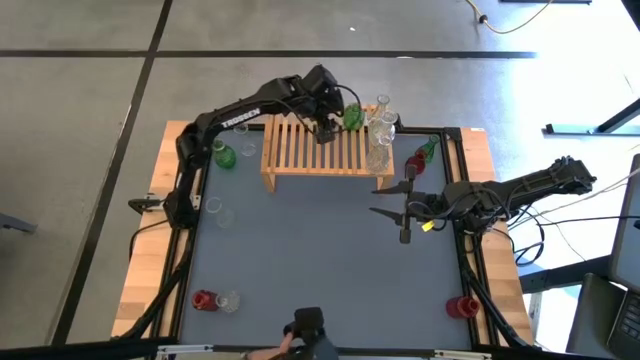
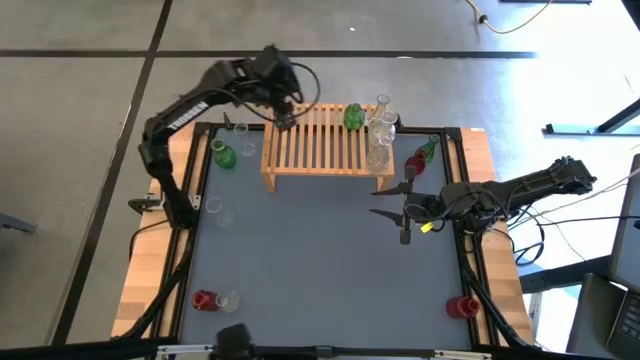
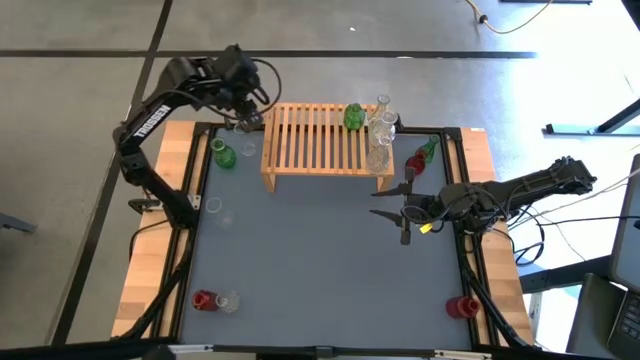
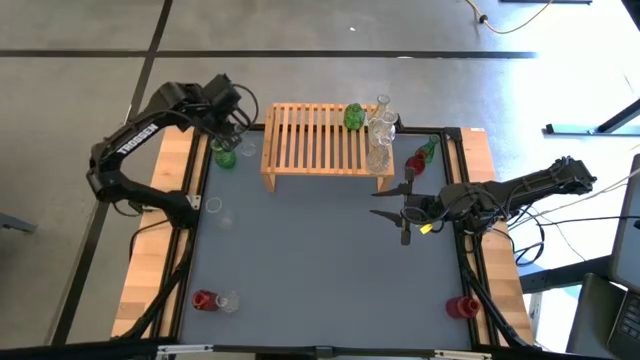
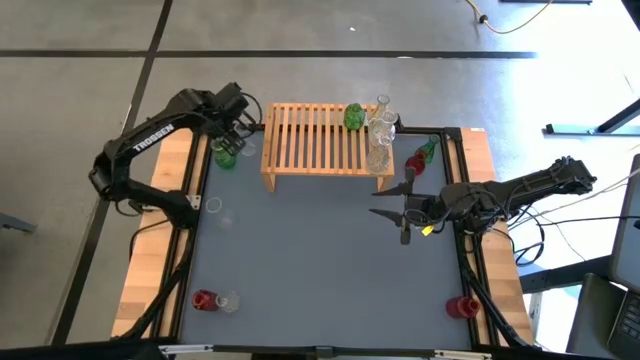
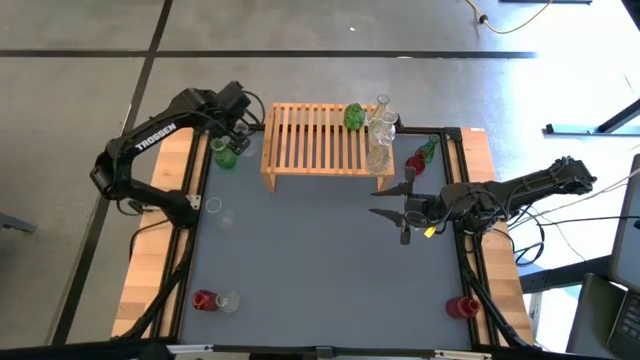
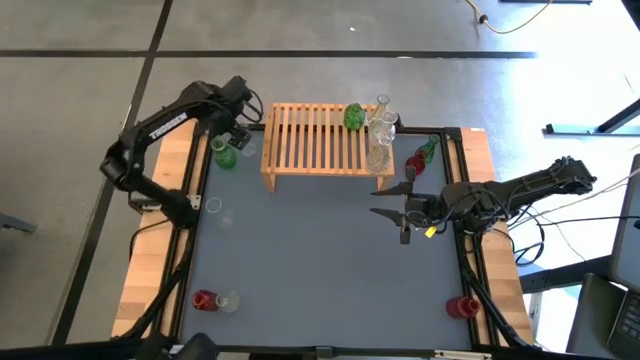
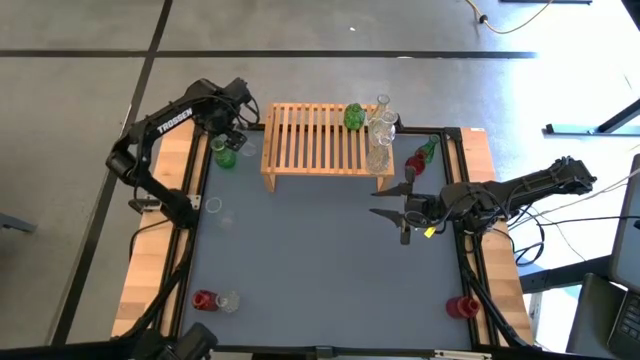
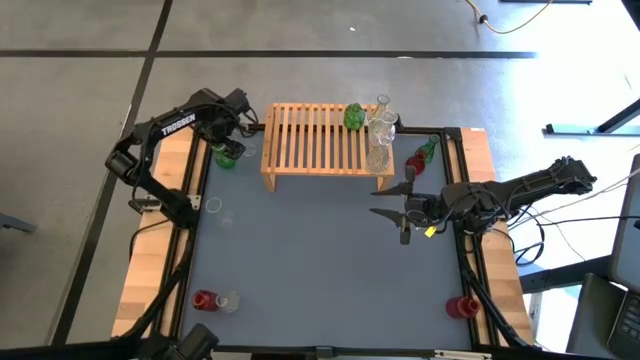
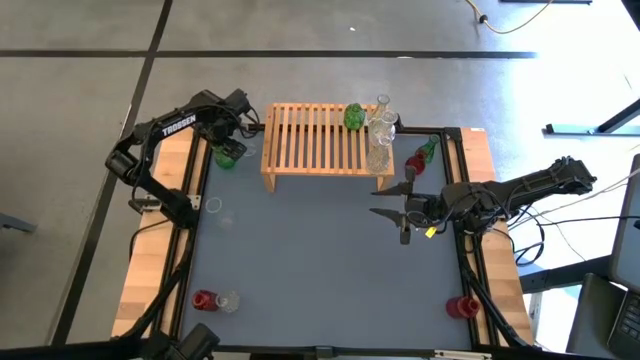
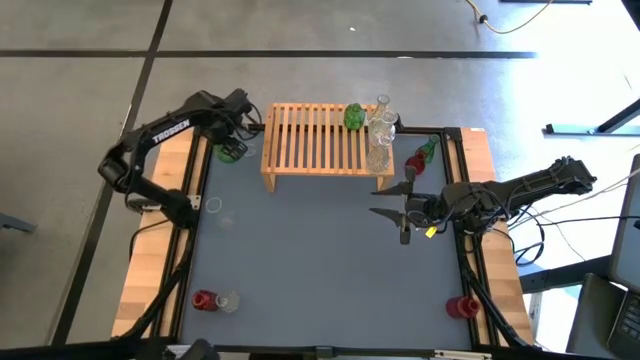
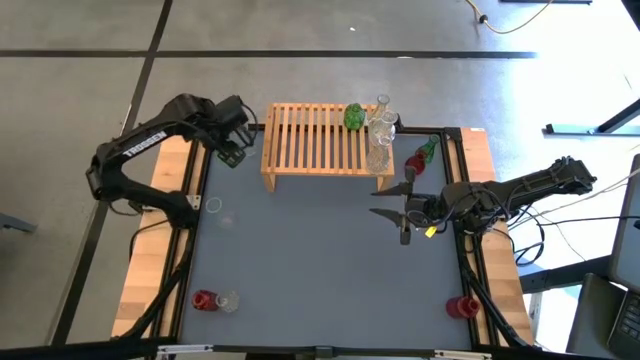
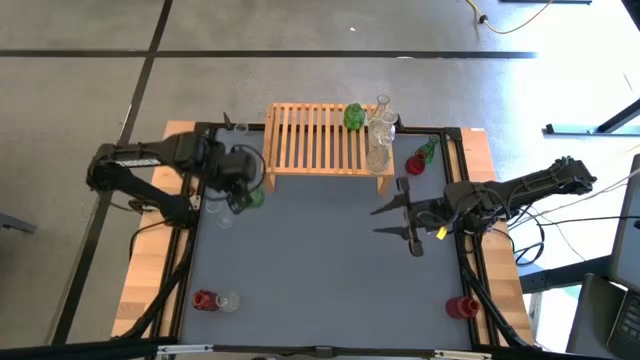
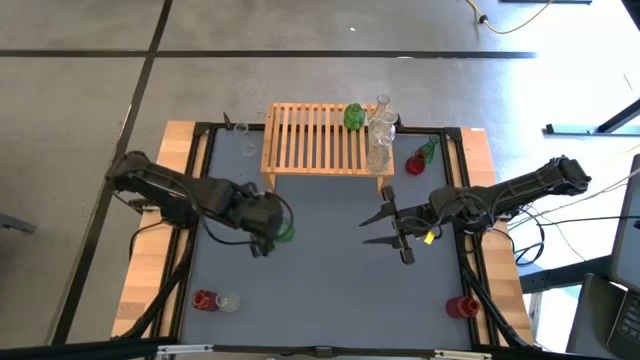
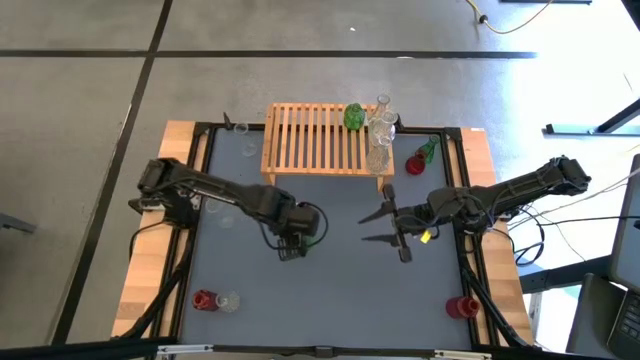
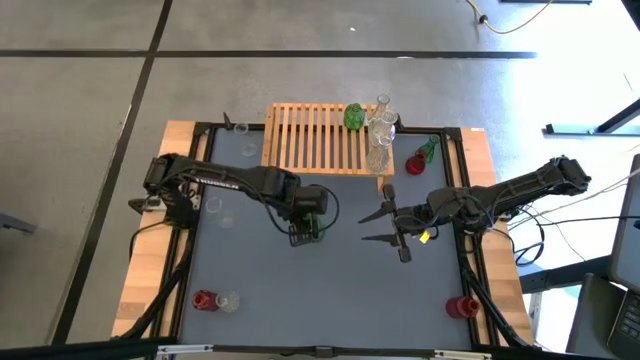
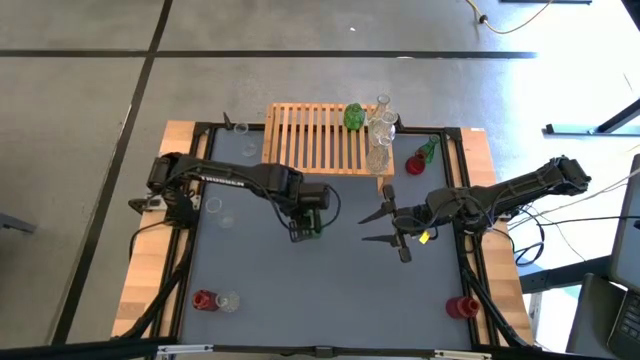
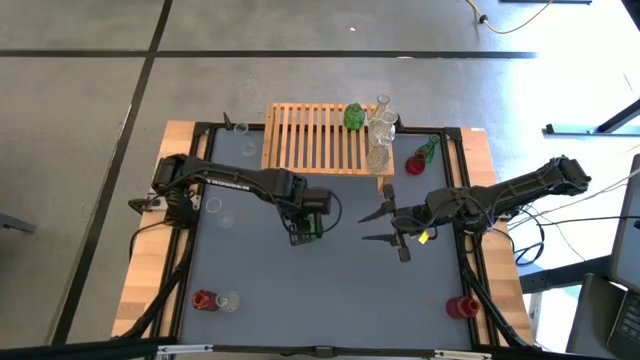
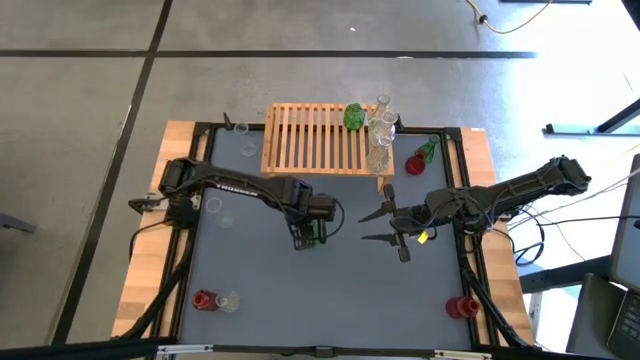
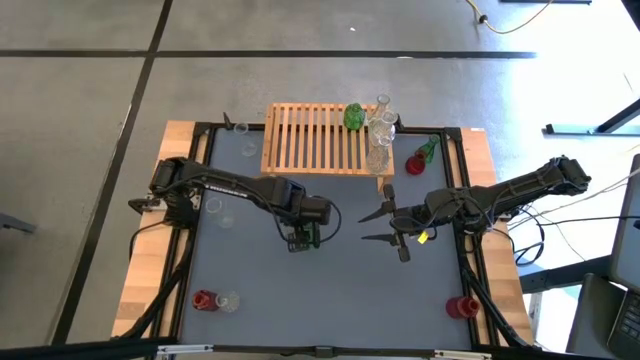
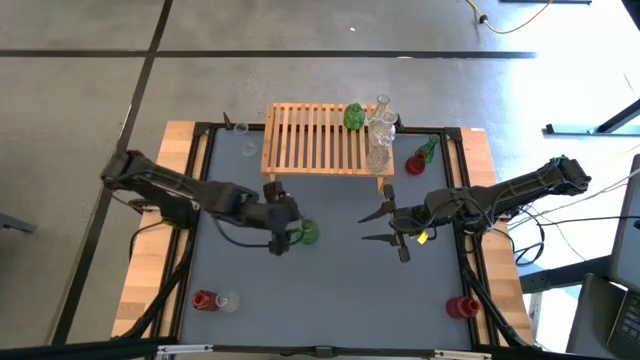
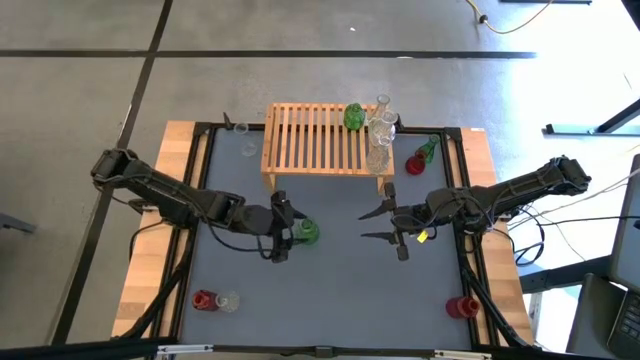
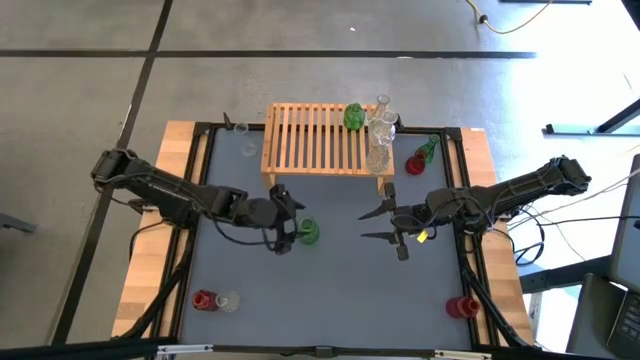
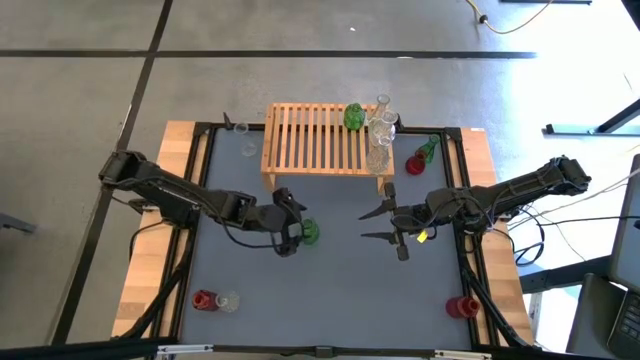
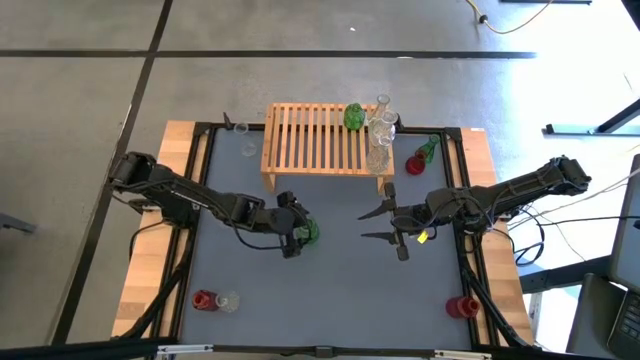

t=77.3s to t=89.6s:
Task: sort vases onto shelf
Put the green vase on the shelf aligned with the other green vase

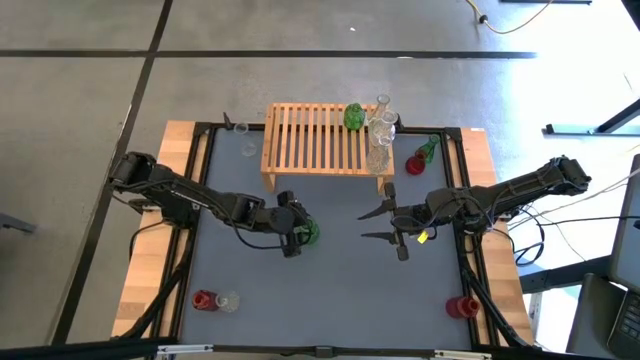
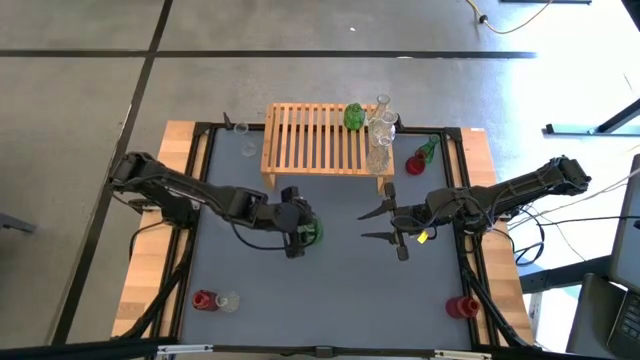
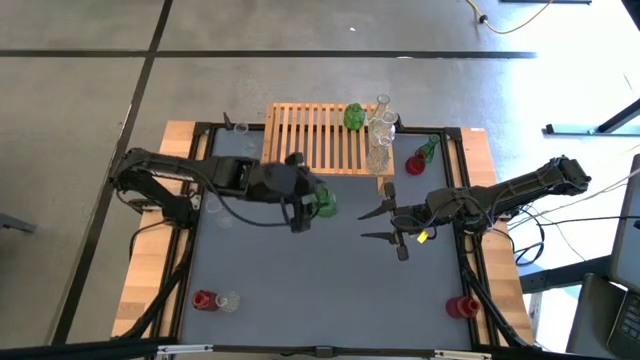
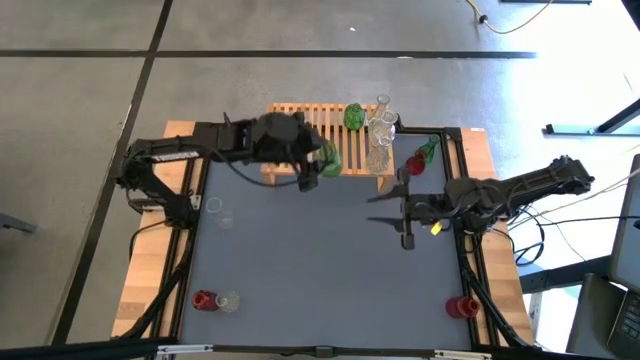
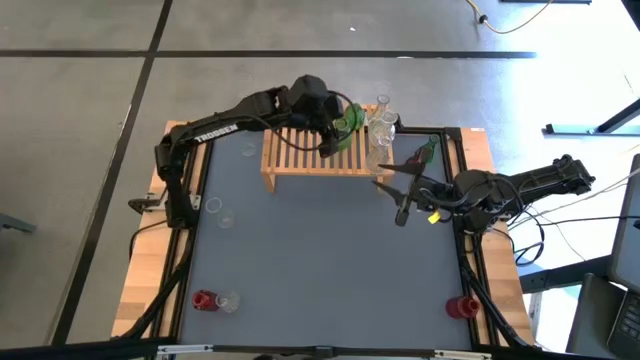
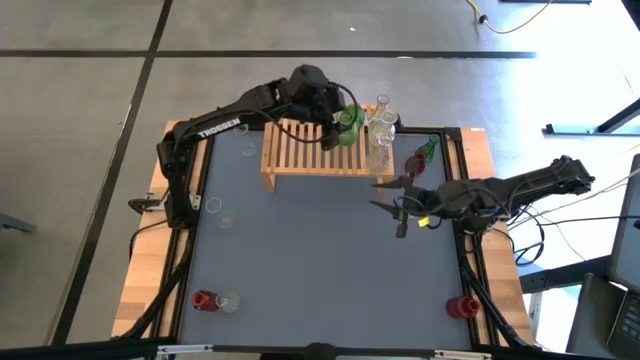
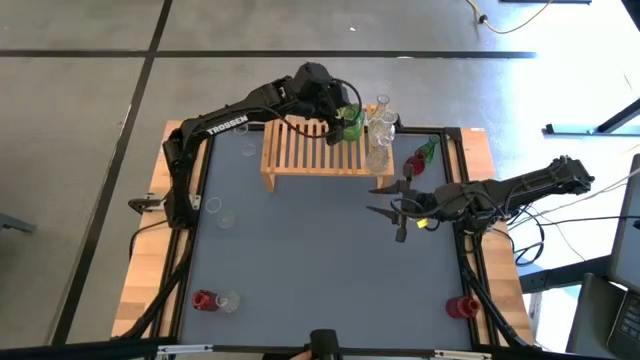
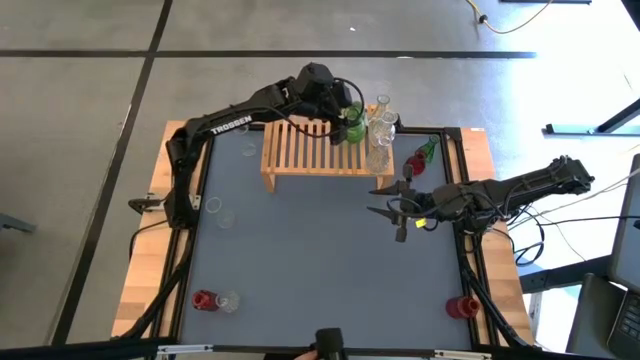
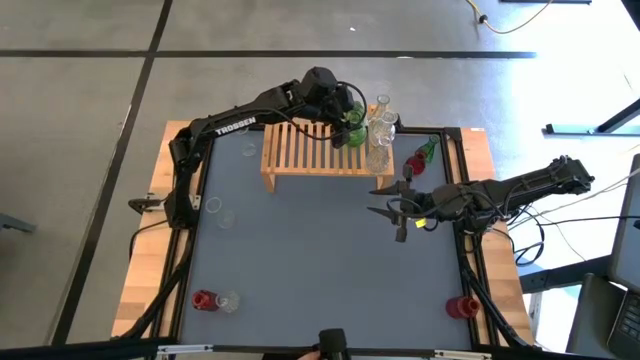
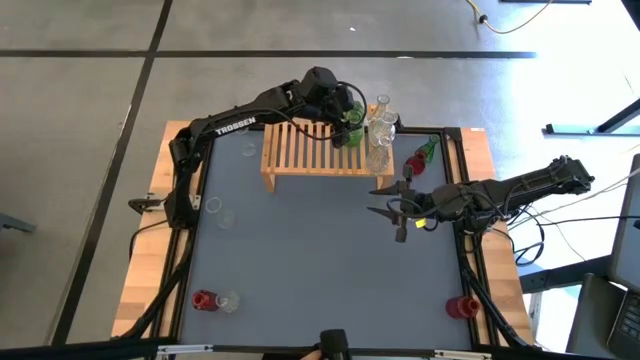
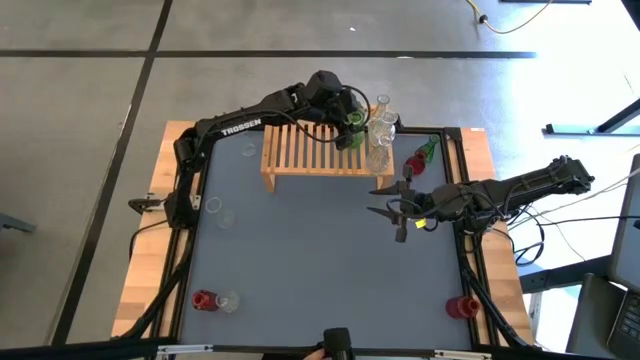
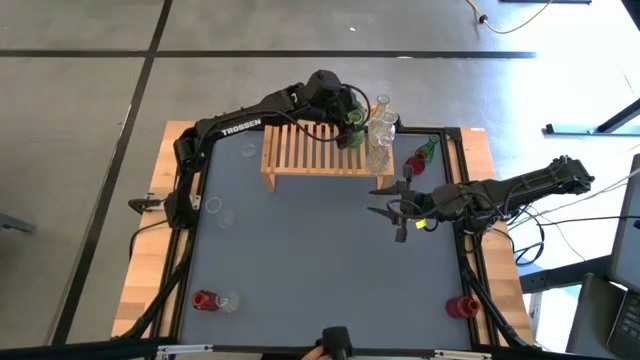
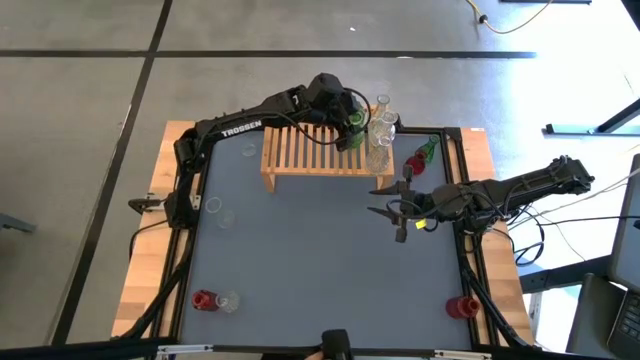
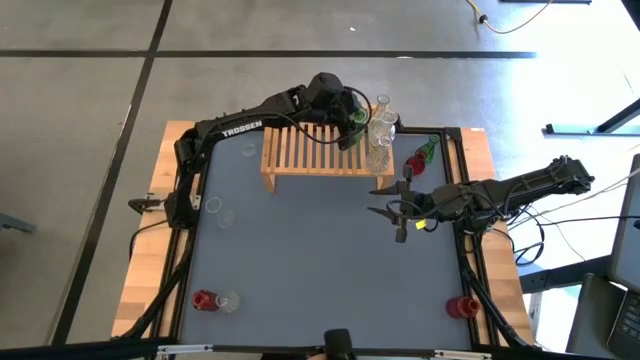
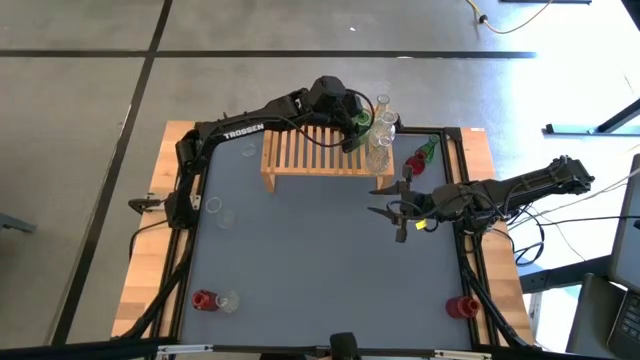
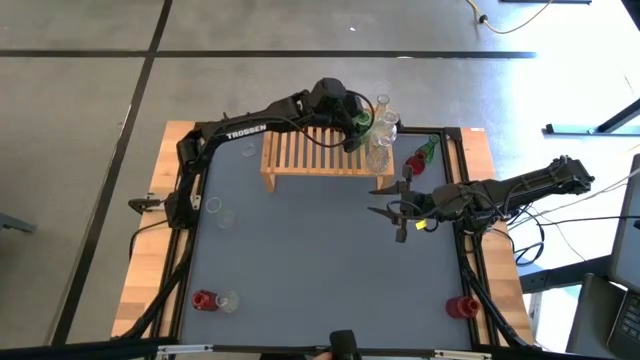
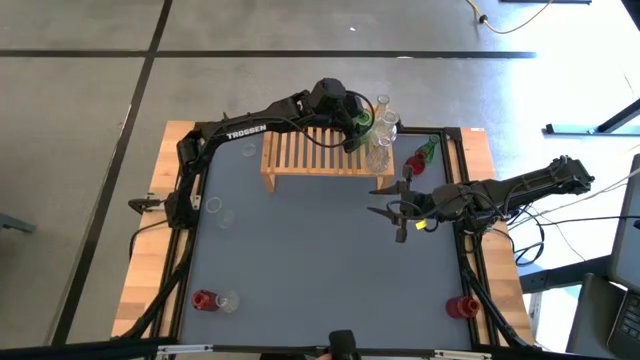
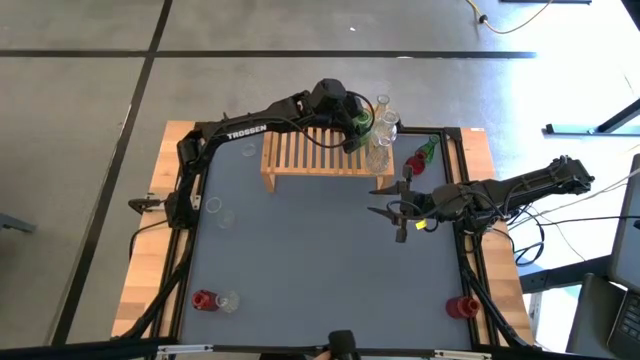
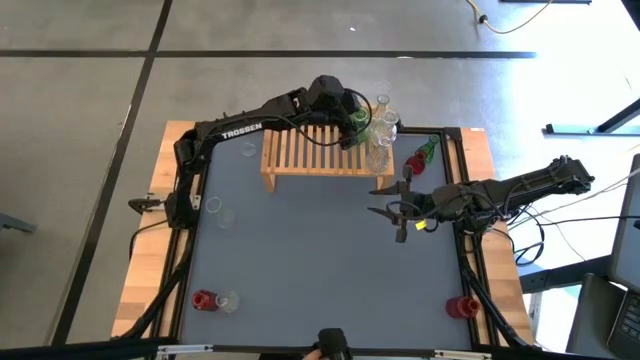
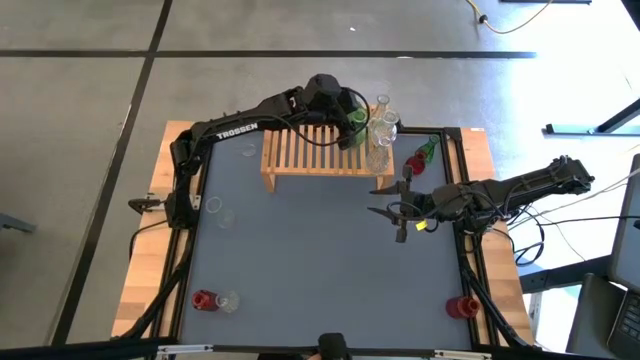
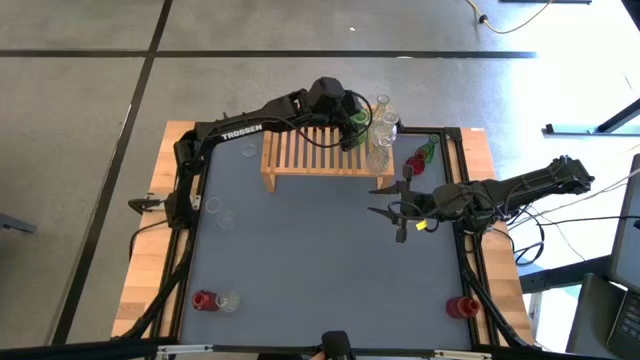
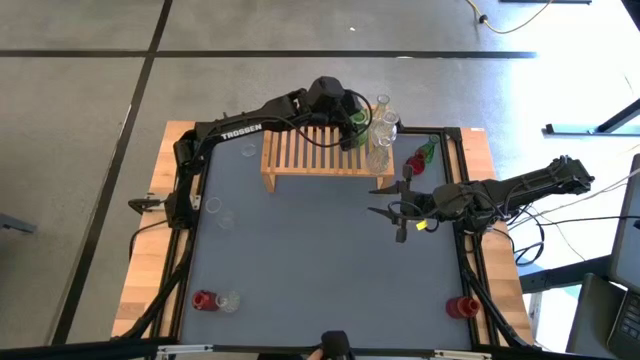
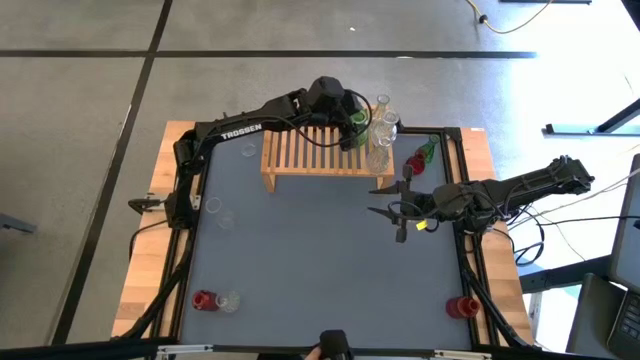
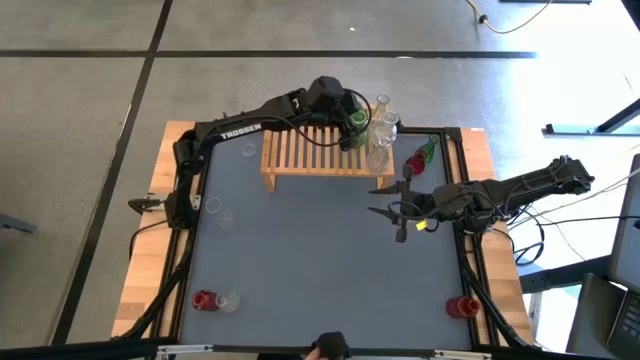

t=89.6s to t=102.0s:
Put the green vase on the shelf aligned with the other green vase
